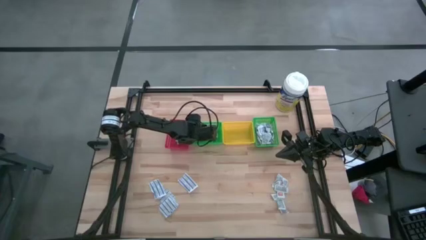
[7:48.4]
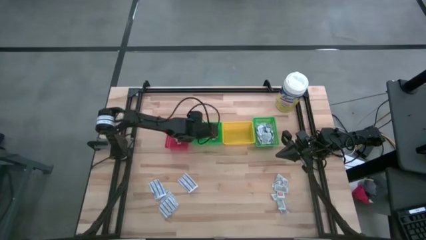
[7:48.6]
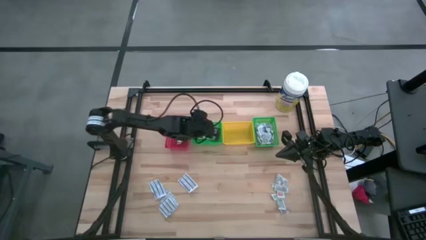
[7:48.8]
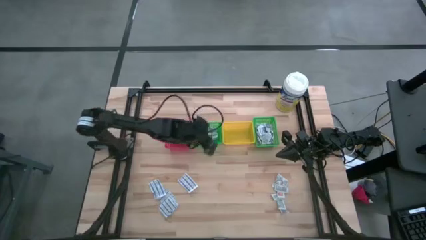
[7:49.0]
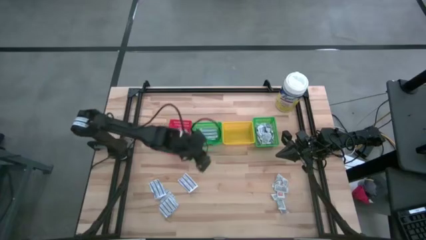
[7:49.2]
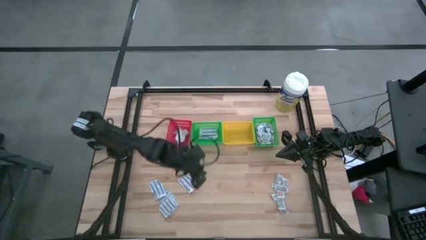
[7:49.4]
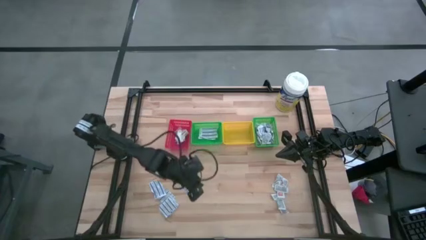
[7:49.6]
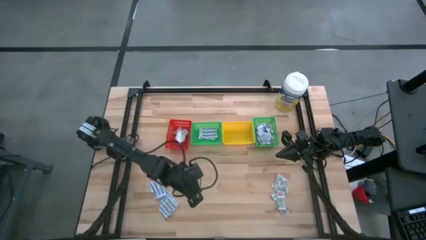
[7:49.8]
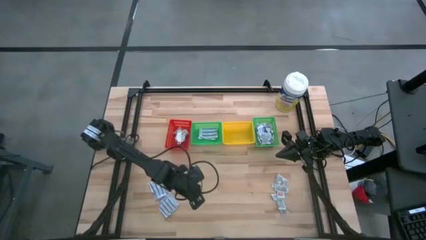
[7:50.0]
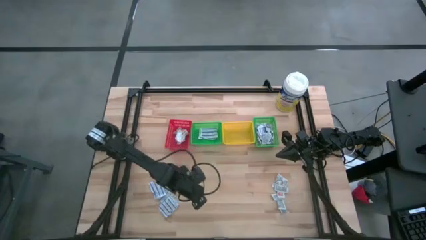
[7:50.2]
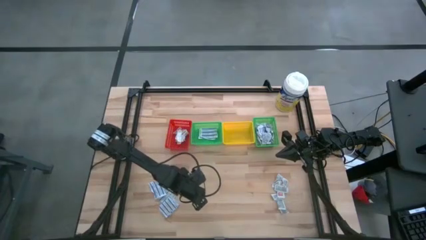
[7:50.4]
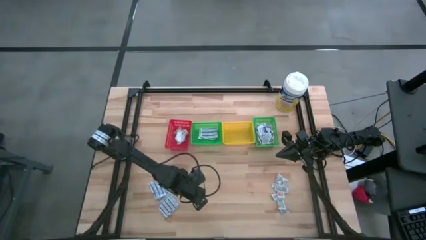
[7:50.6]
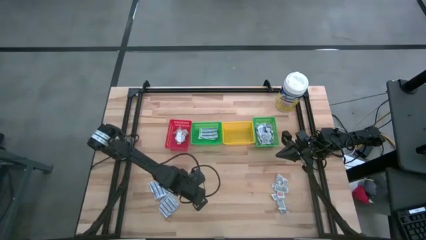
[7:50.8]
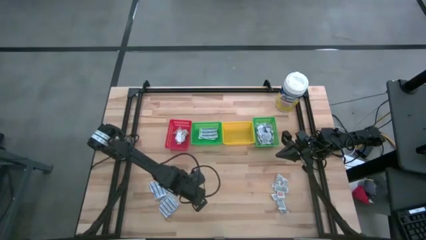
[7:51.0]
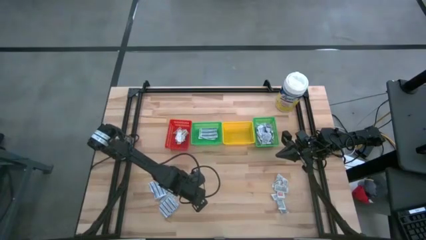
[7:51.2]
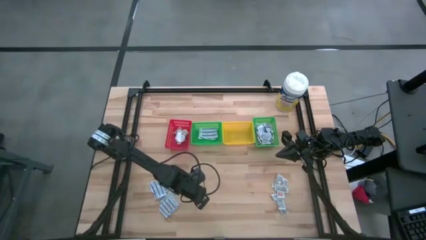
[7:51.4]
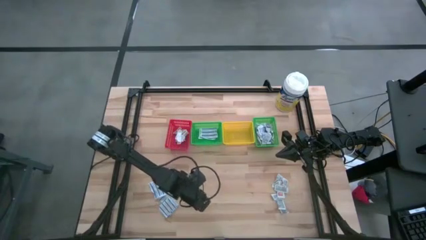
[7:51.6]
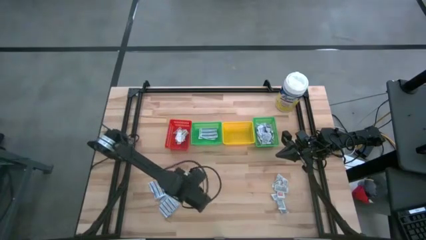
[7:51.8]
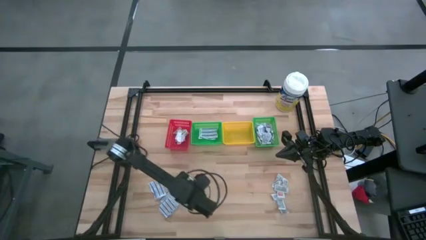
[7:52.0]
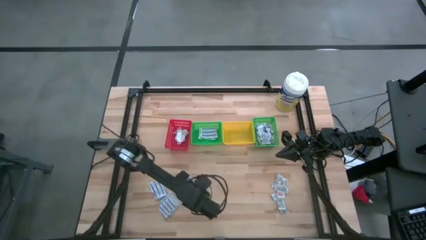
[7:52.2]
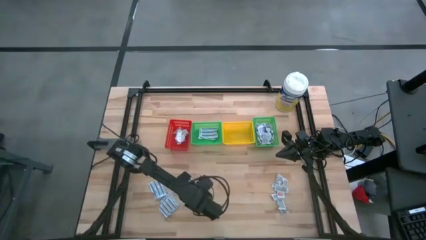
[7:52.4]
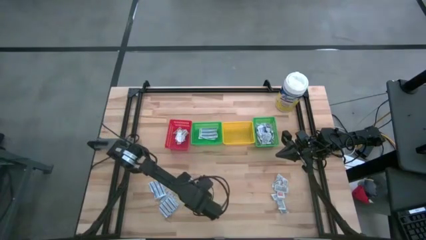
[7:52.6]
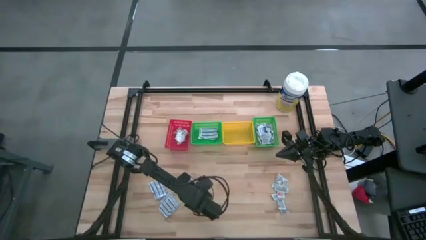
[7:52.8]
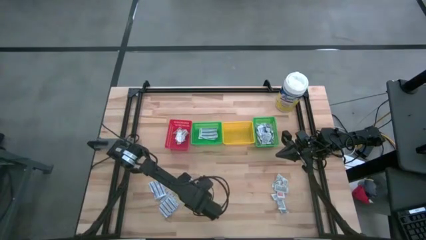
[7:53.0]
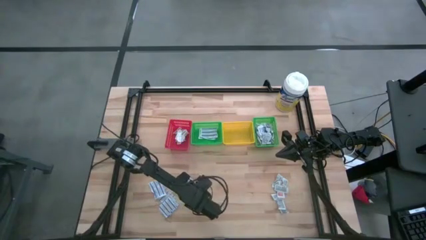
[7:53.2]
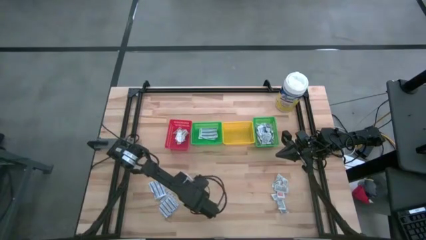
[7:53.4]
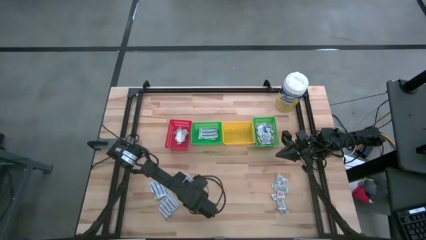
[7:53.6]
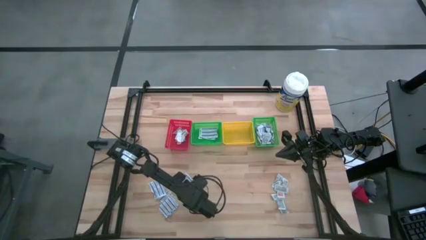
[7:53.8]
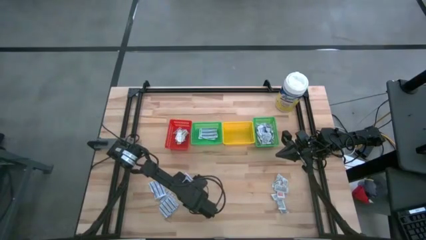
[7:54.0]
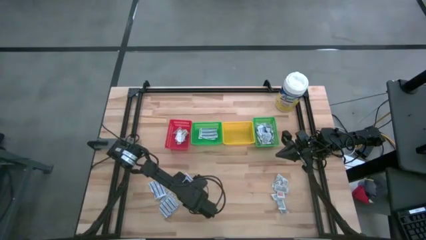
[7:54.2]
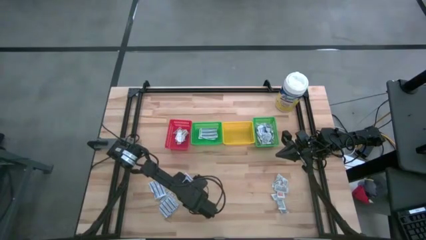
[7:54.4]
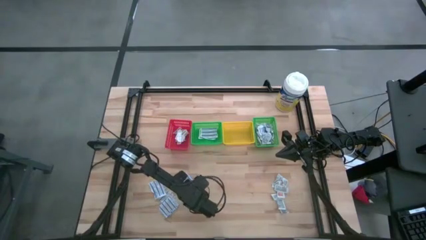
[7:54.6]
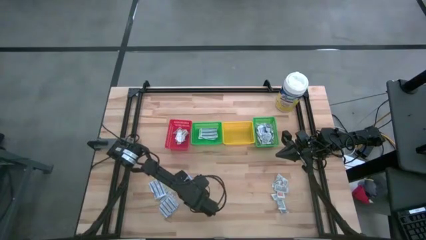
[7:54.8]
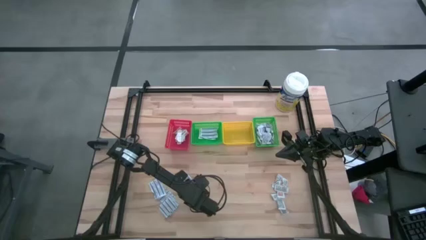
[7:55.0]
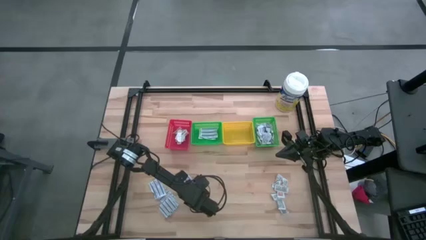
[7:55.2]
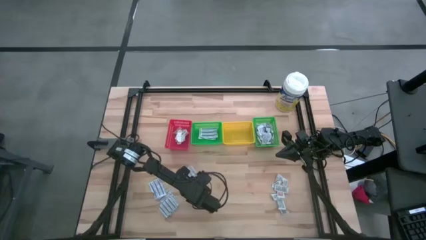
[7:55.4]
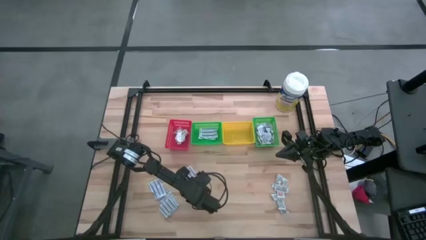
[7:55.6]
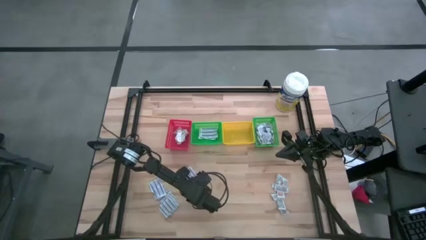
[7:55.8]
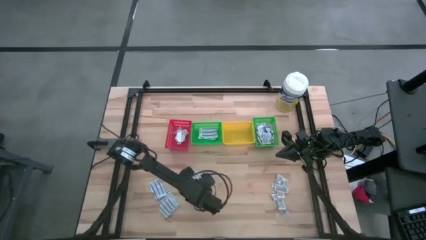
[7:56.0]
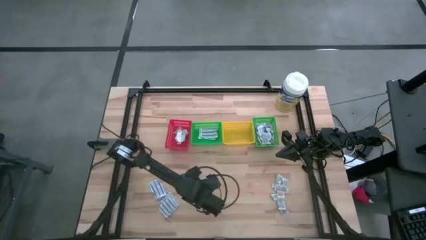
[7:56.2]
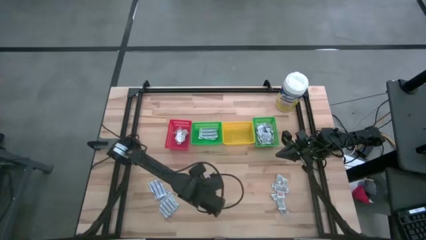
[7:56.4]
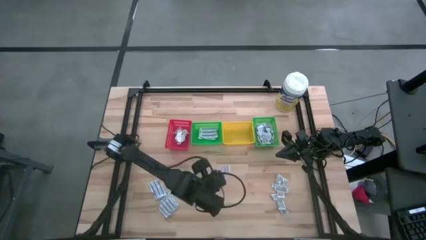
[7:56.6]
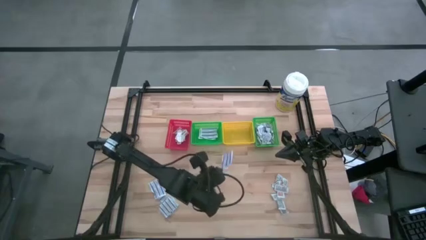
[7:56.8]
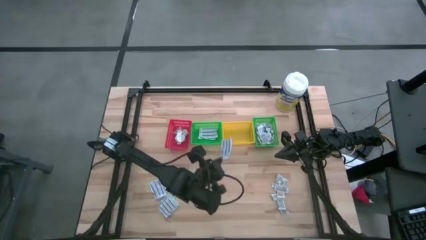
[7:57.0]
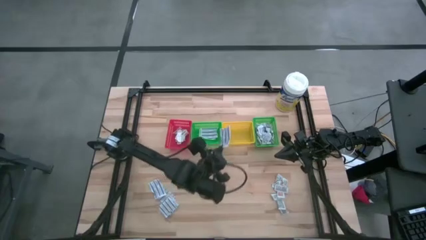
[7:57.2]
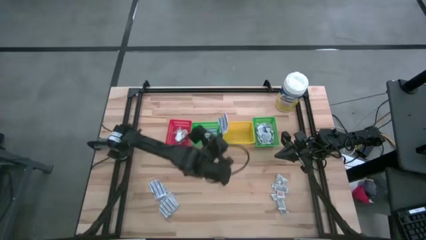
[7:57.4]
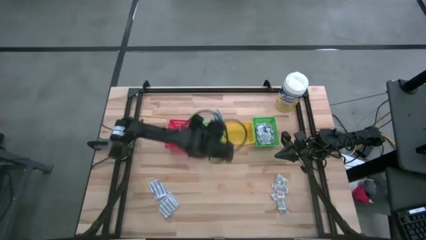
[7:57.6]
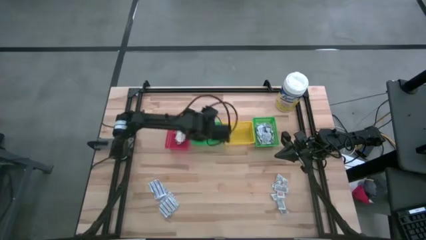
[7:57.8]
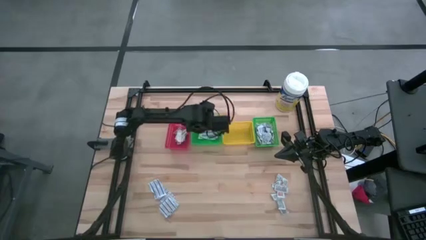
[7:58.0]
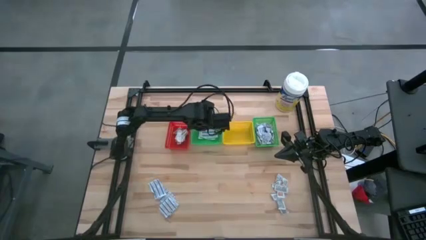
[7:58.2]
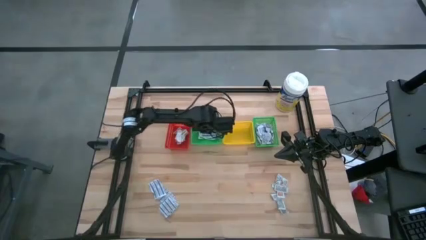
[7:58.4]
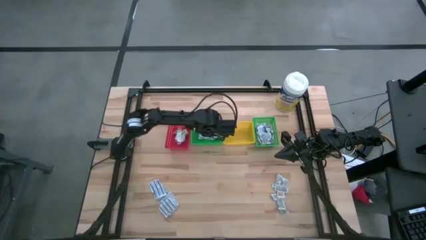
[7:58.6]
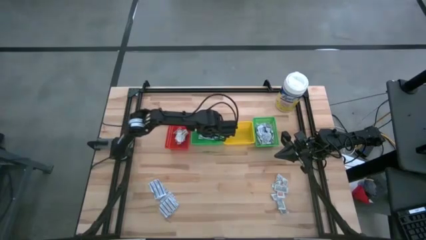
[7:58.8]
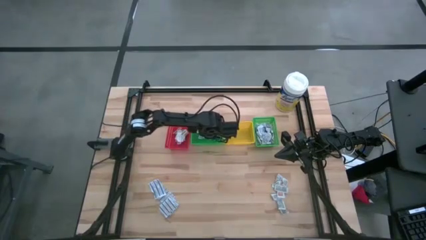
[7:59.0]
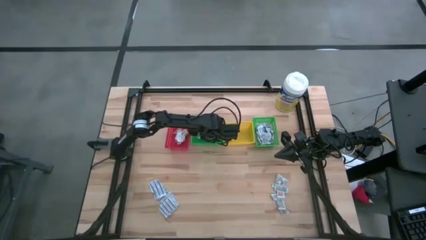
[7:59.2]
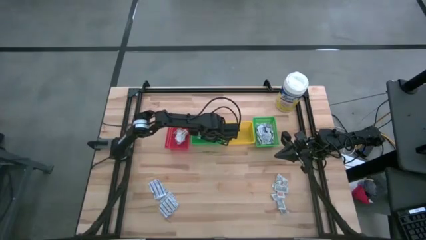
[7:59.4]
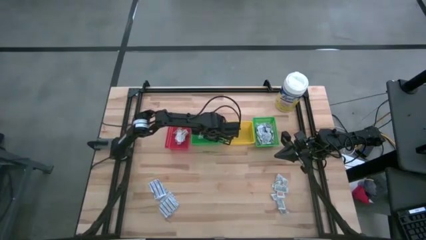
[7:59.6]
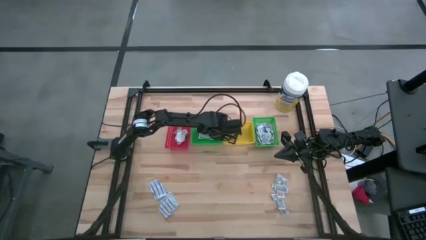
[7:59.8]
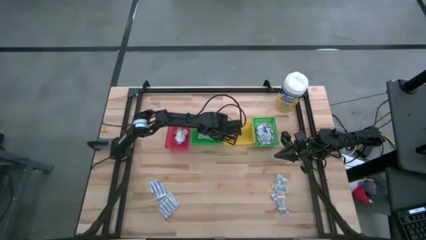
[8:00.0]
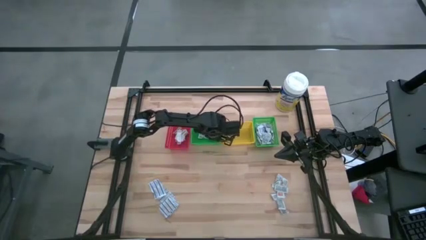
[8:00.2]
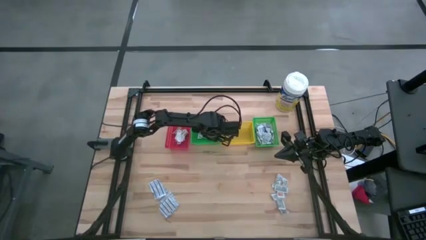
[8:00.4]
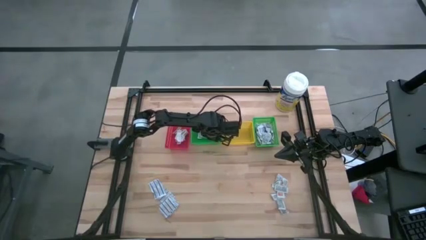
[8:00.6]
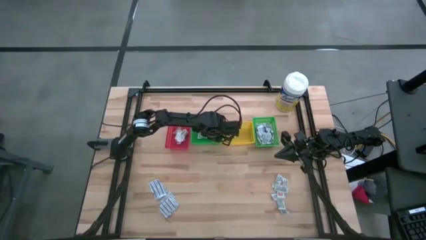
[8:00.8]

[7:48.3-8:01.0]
Task: Pick & Place First Aid Supplies
Put the blue bandage into the left green bin
